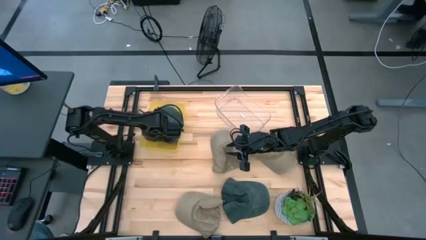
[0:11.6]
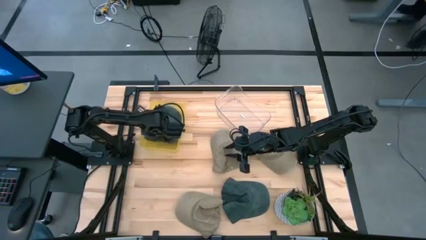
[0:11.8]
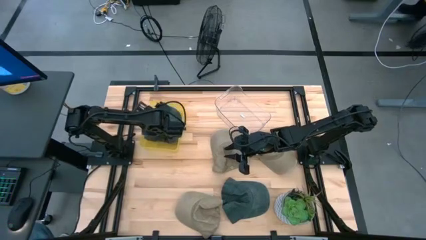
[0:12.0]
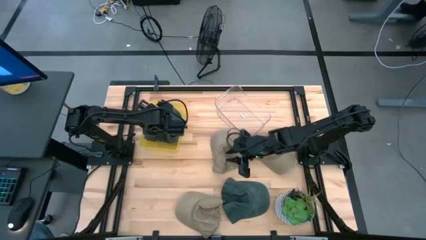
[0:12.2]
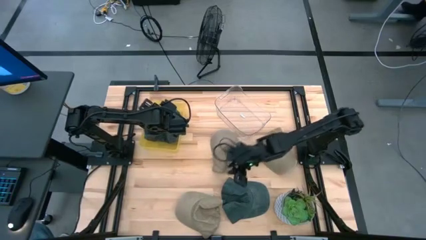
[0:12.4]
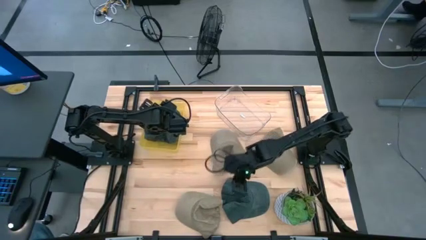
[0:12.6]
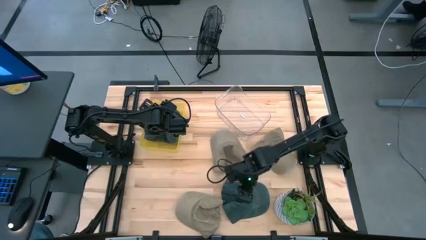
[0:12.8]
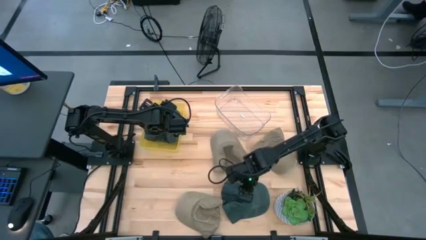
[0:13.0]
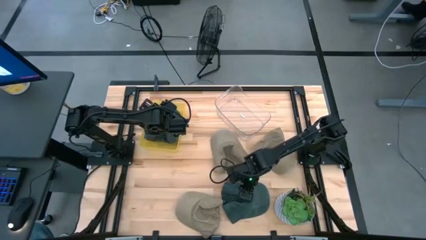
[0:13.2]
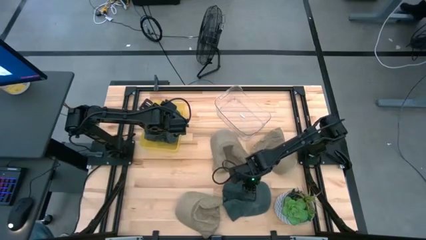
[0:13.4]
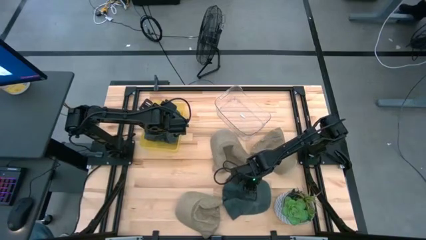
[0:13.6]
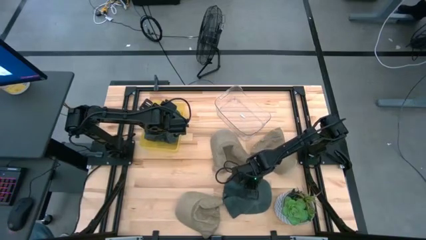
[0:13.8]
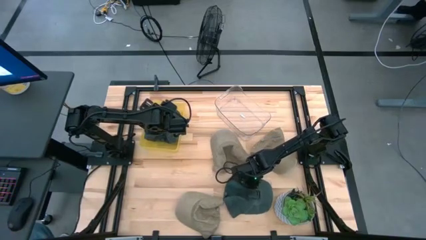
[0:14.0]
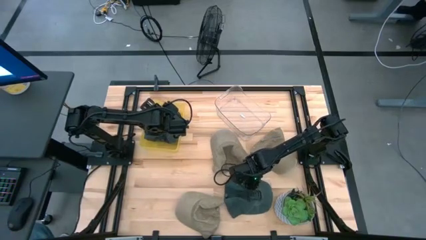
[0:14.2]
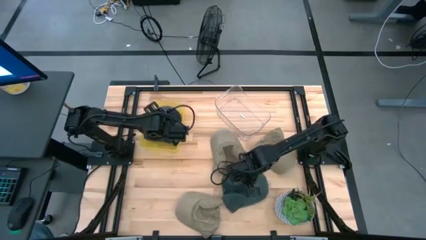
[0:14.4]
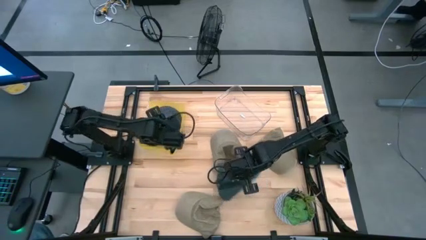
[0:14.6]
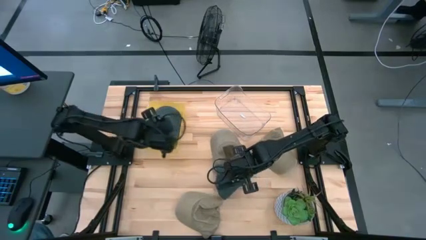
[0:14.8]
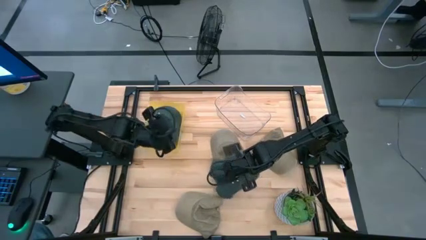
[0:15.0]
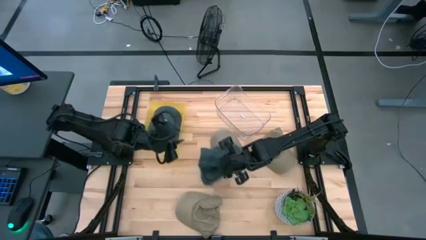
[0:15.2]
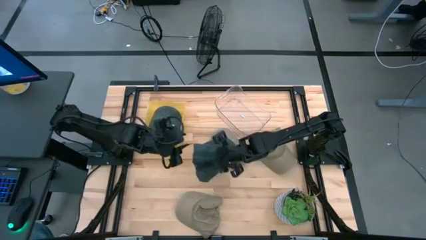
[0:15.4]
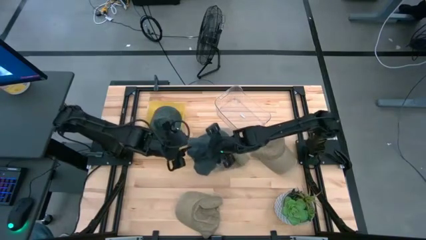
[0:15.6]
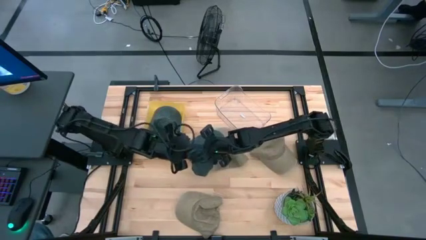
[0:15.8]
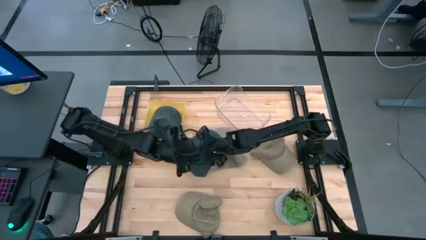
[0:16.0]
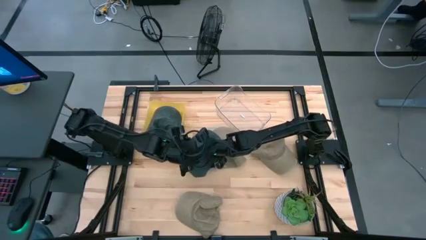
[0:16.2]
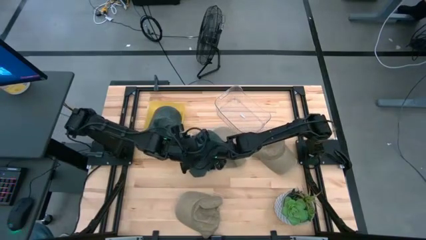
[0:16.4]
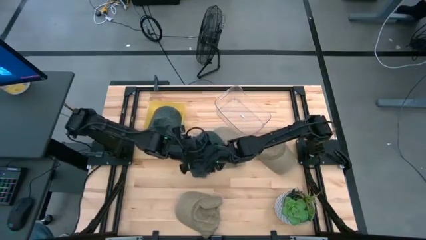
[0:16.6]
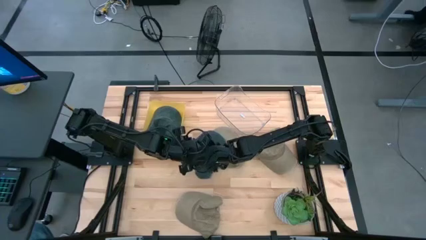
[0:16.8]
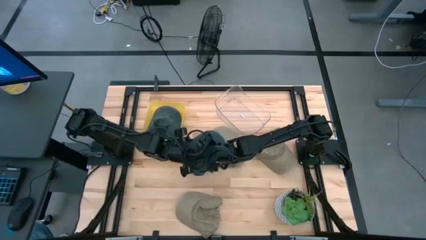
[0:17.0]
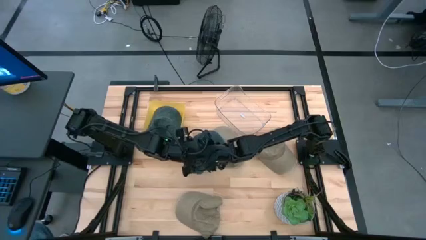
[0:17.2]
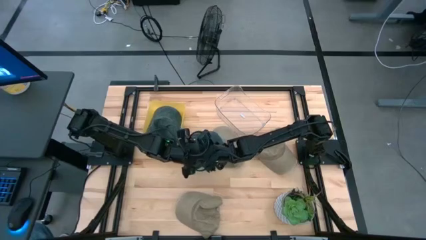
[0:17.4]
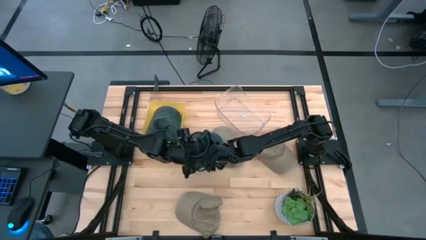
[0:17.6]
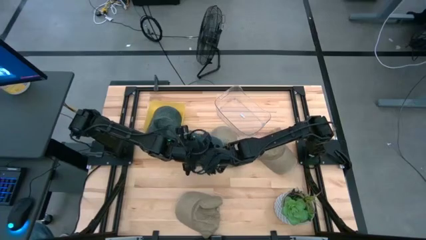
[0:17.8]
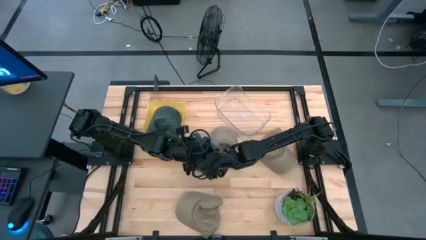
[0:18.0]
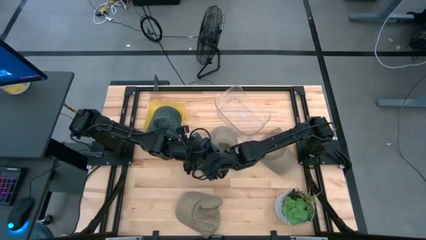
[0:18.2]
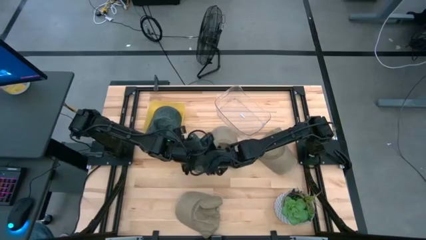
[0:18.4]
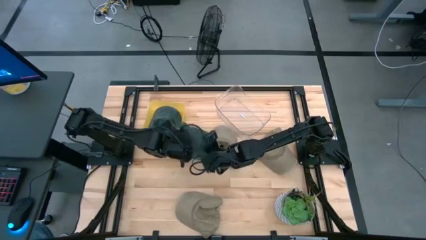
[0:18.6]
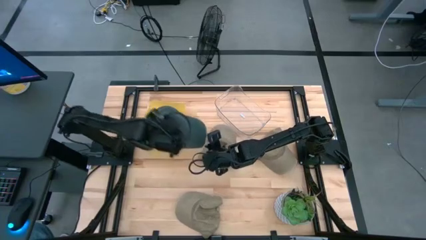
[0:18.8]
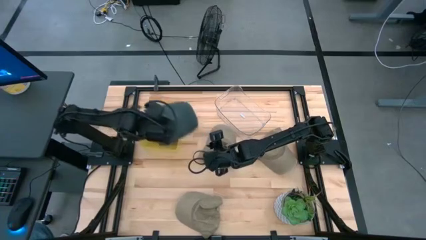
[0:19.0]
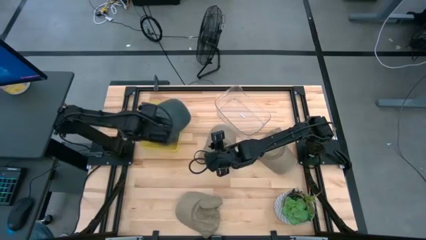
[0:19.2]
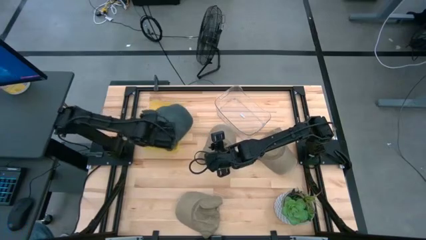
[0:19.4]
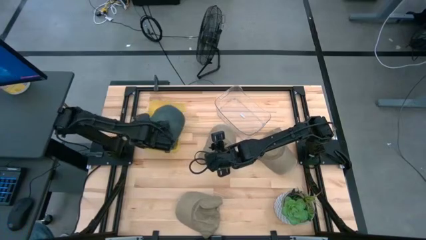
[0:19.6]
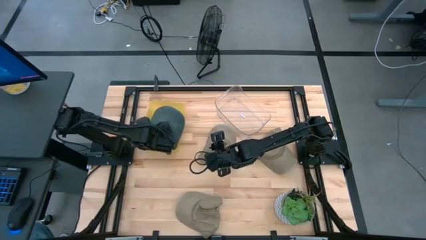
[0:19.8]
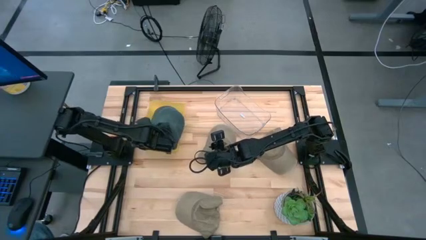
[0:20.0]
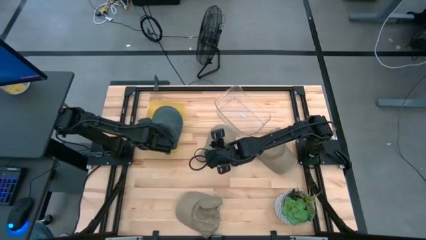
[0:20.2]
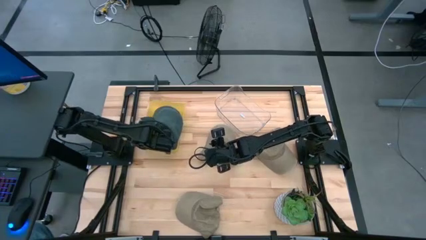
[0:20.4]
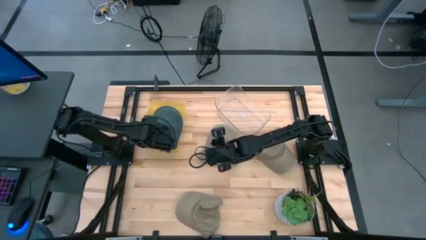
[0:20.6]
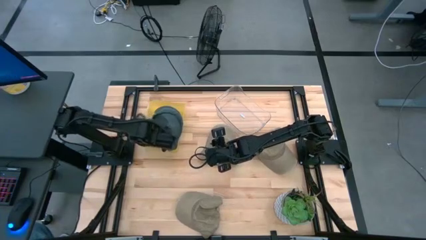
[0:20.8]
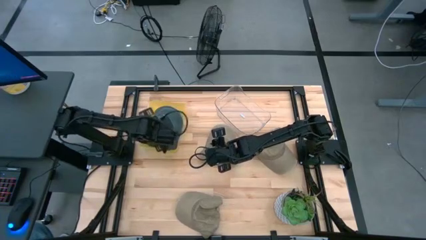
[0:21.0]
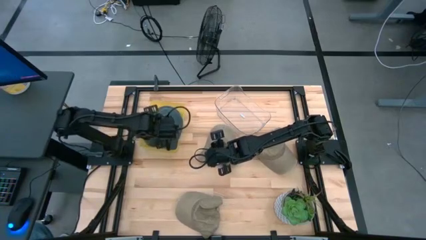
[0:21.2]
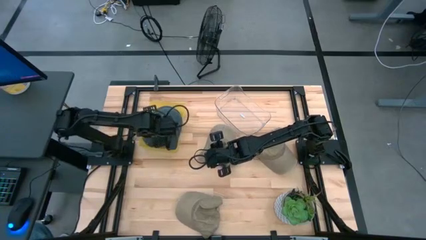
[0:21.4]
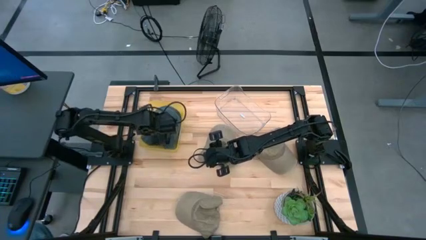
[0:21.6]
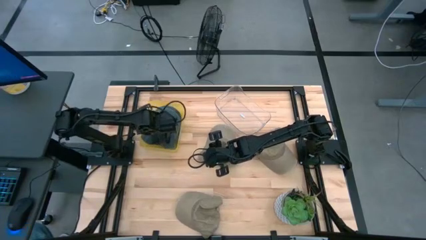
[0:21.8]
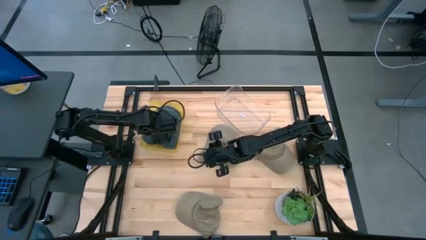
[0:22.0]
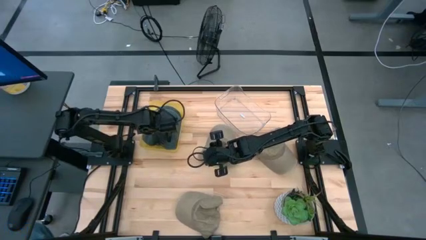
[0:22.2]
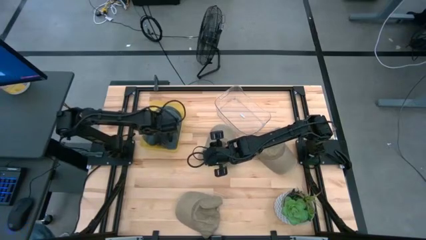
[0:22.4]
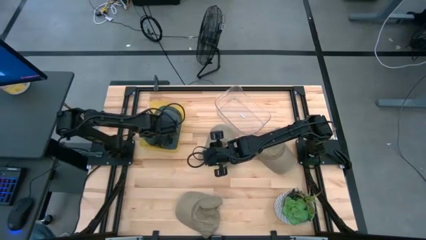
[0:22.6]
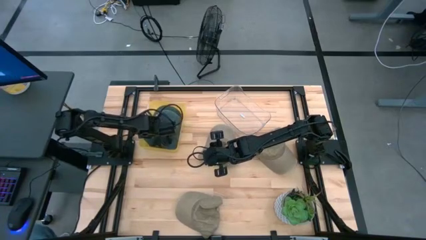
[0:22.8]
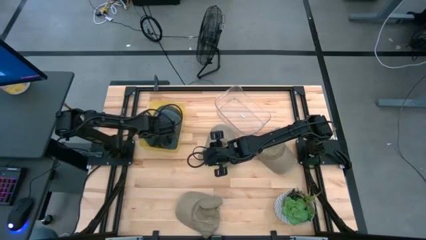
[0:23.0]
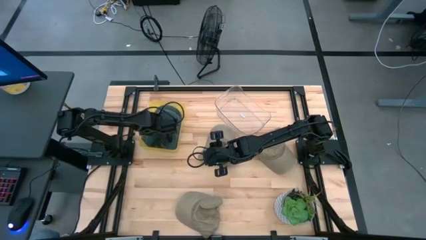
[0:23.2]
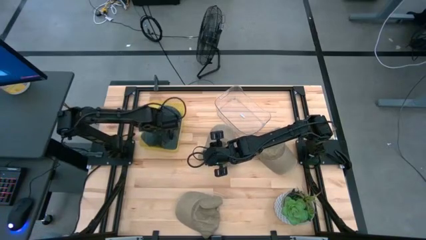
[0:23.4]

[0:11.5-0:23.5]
Task: Pick & Place hat
Put the black cap into the yellow bin

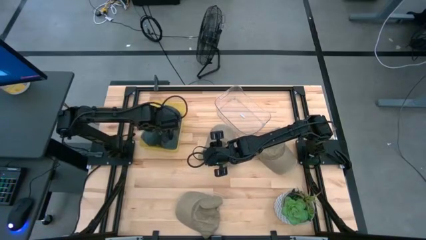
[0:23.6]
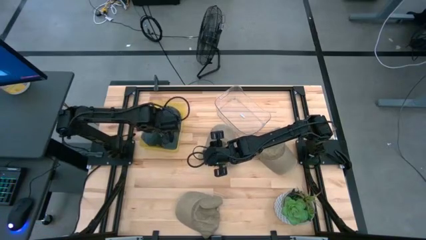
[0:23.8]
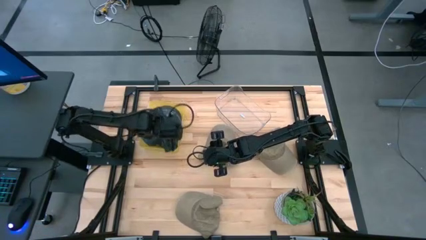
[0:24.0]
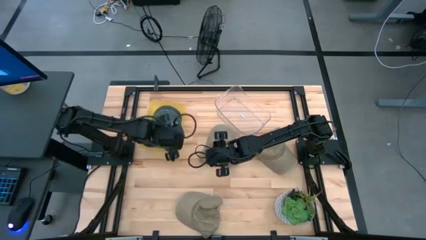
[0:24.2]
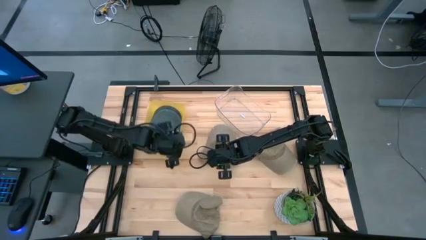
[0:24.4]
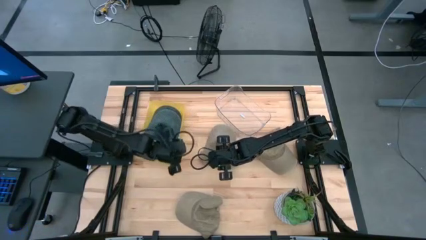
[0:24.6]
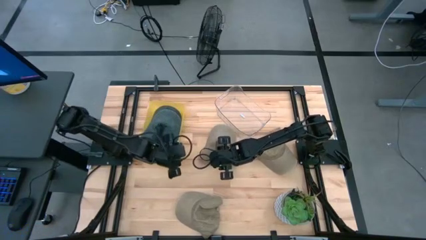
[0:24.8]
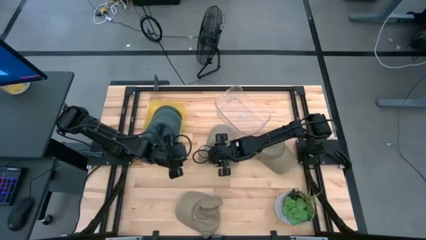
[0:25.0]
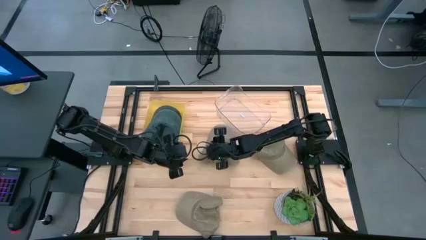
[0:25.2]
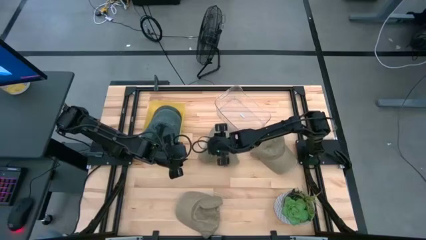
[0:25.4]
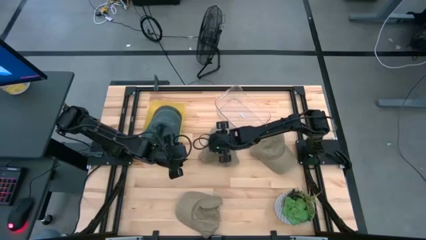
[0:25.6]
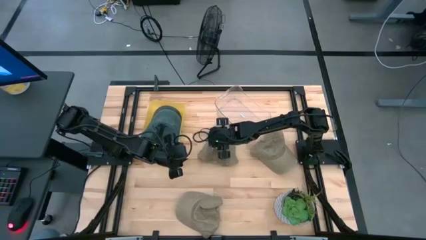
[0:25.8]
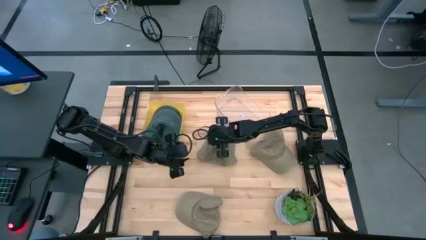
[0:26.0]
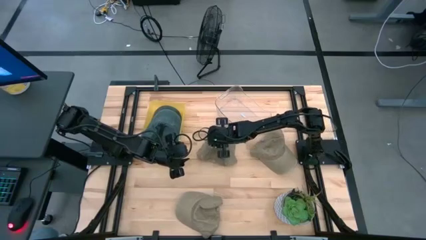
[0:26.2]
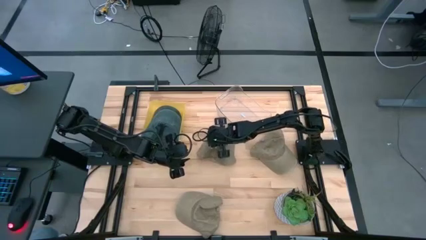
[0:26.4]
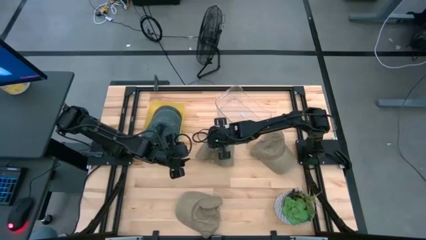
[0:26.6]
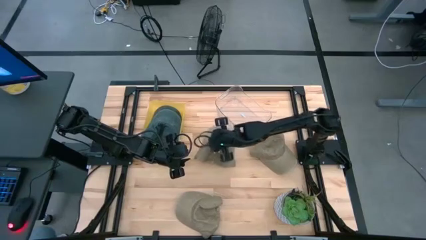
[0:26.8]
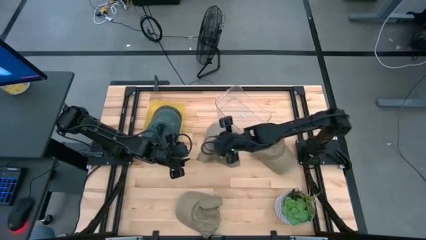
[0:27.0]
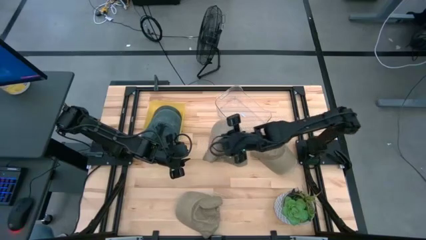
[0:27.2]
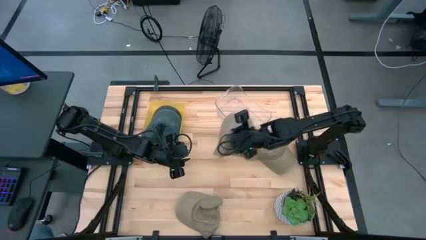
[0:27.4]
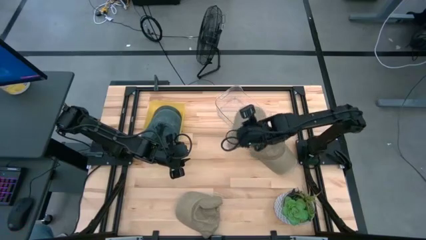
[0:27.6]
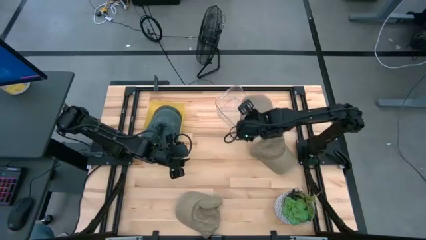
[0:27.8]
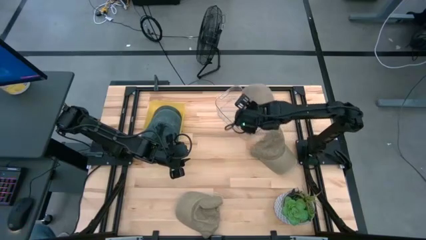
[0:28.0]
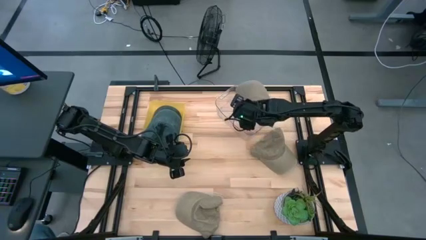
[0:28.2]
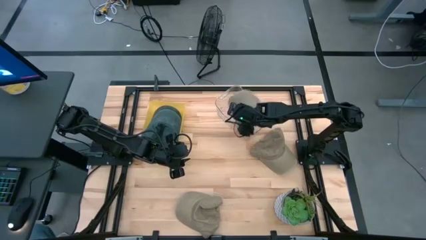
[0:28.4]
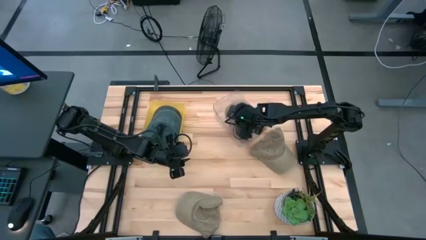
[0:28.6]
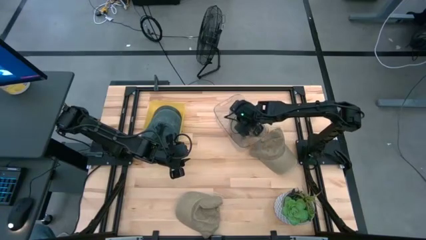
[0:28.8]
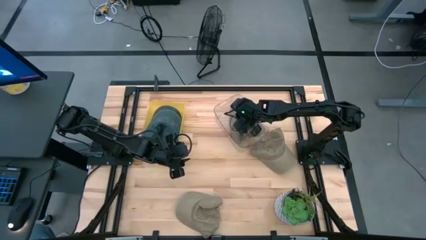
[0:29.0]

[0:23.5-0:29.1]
Put the top left brown cap into the transparent bin
